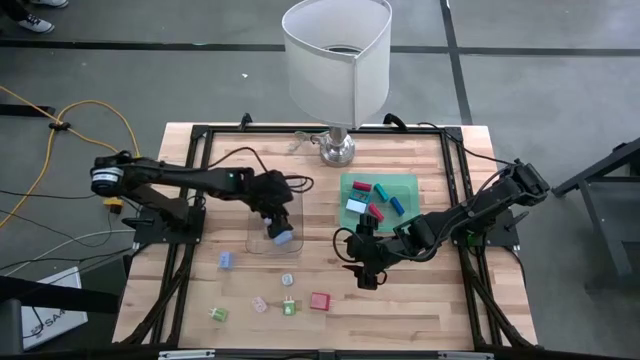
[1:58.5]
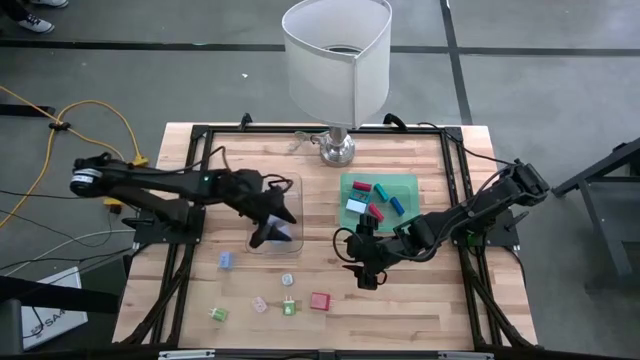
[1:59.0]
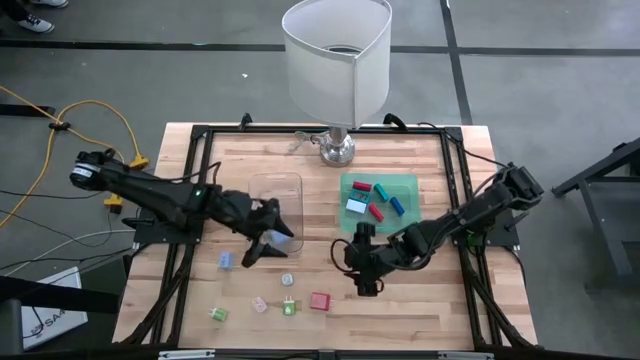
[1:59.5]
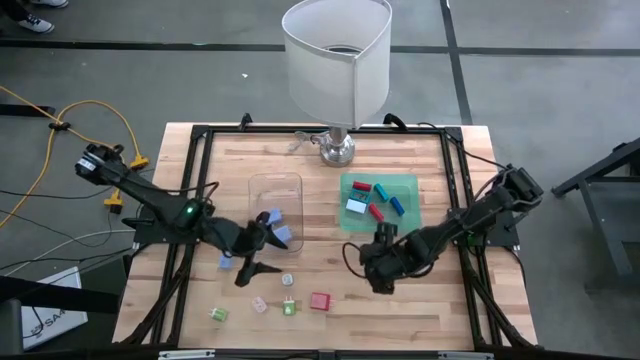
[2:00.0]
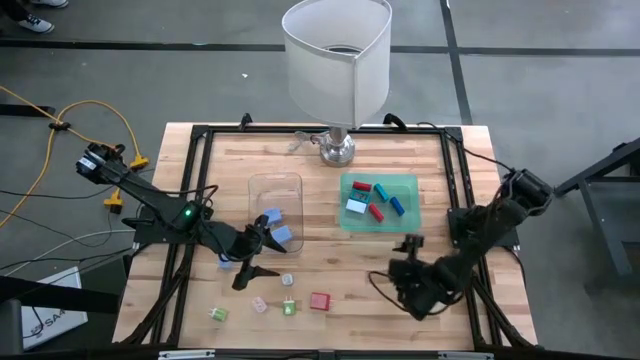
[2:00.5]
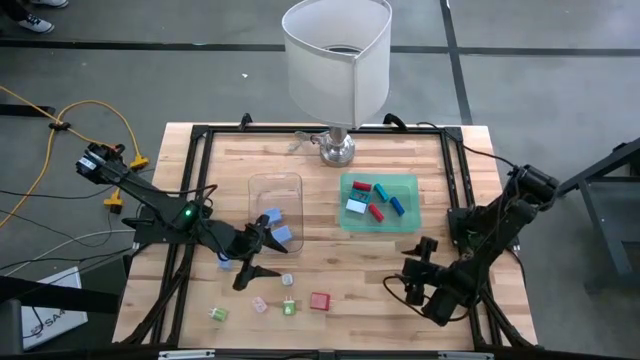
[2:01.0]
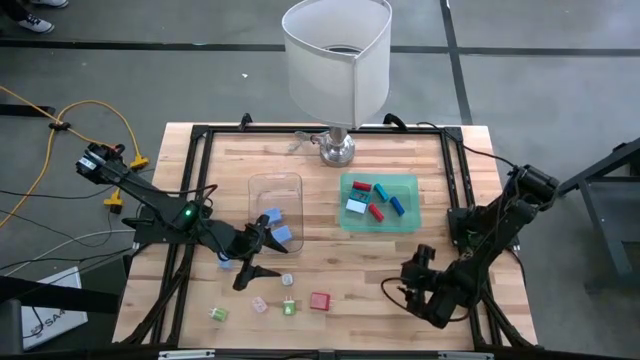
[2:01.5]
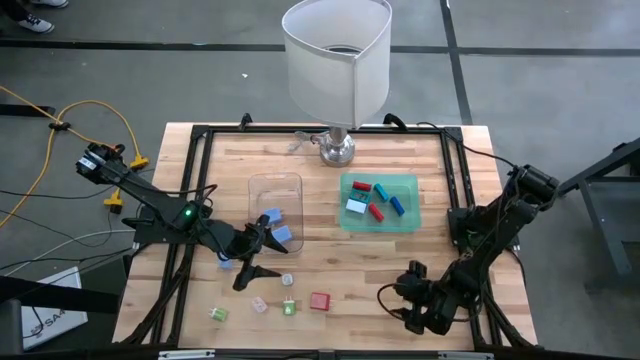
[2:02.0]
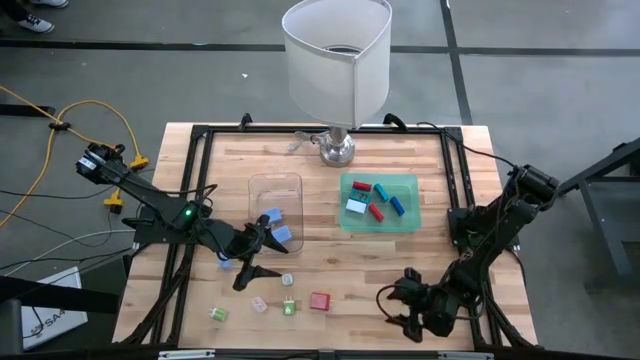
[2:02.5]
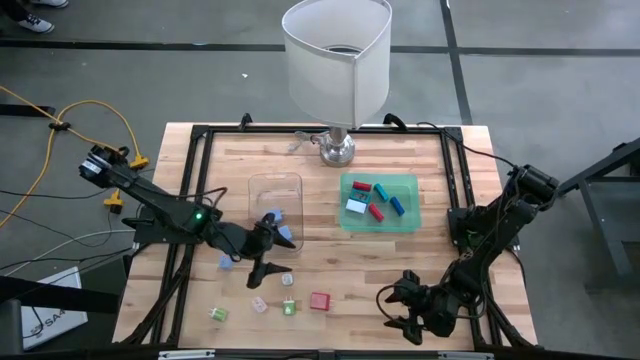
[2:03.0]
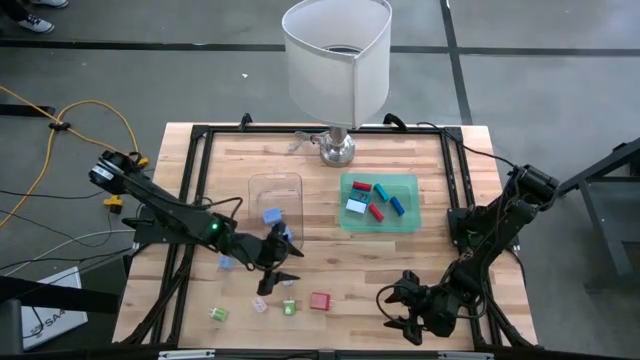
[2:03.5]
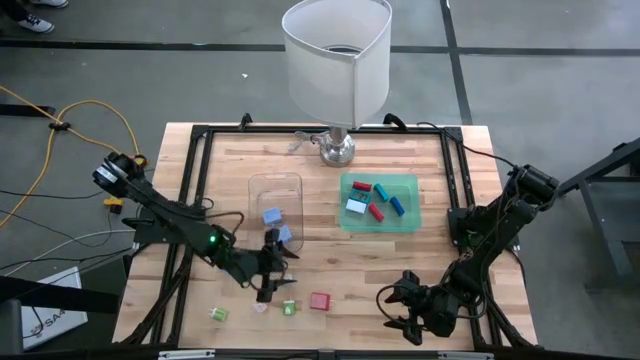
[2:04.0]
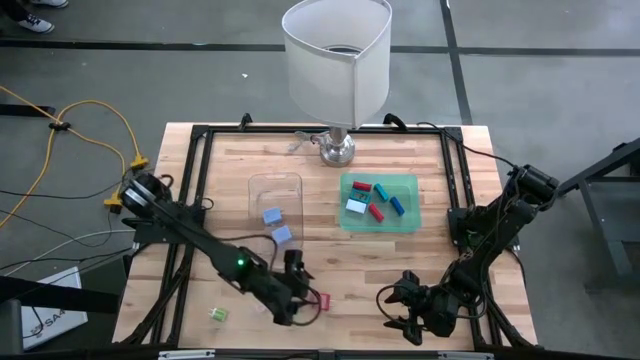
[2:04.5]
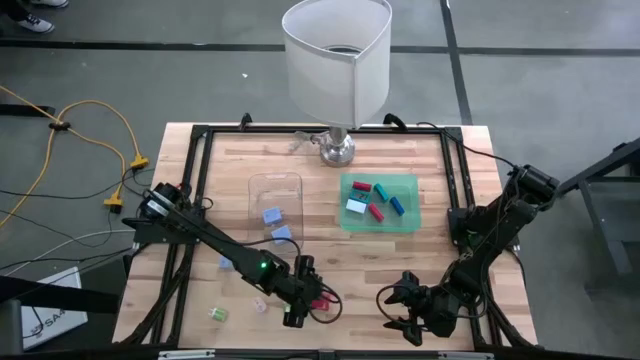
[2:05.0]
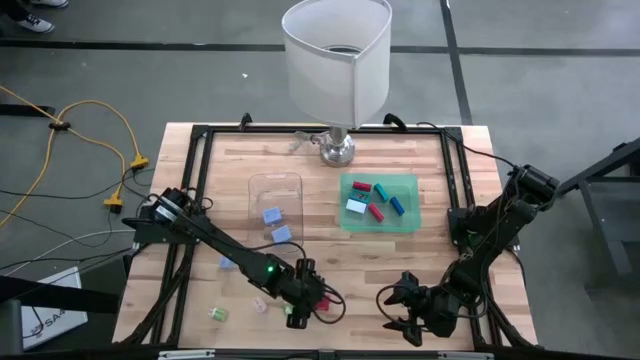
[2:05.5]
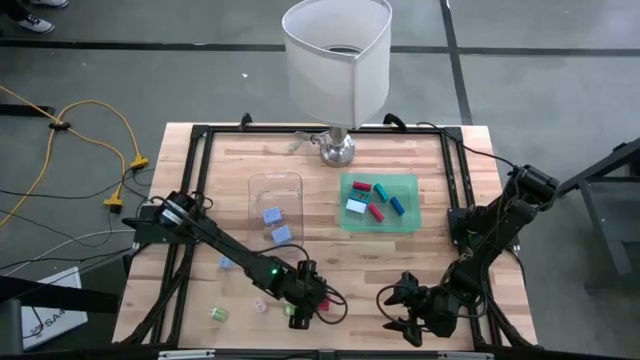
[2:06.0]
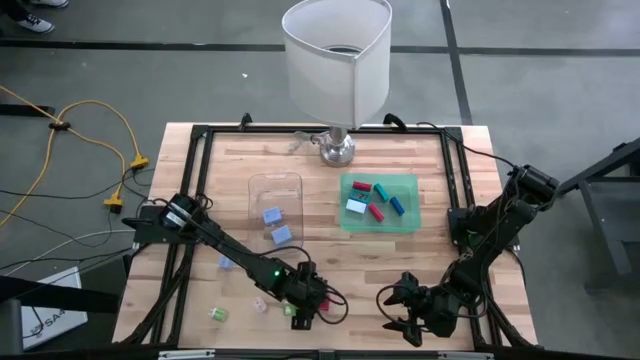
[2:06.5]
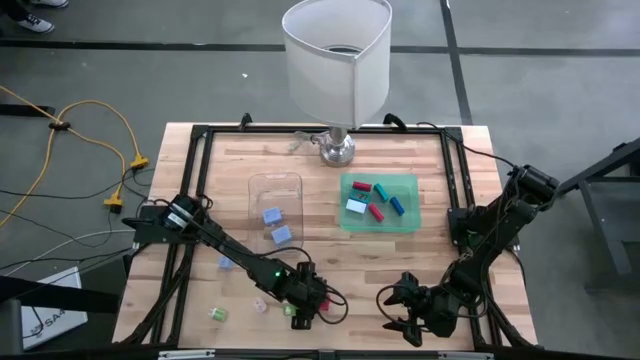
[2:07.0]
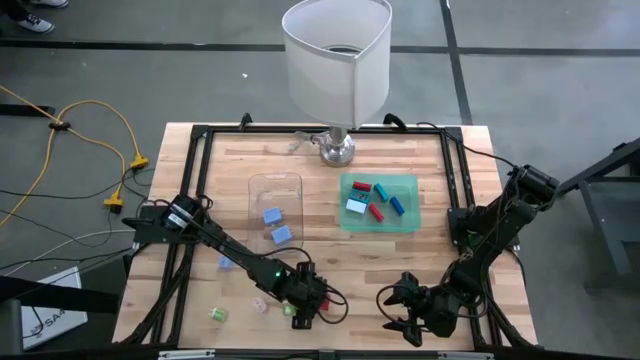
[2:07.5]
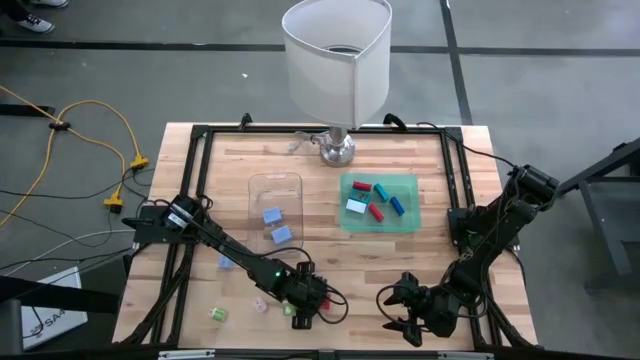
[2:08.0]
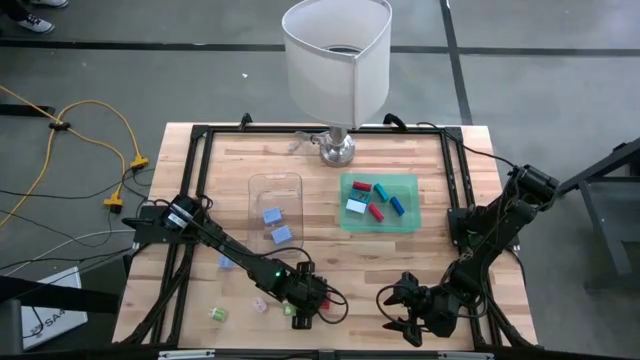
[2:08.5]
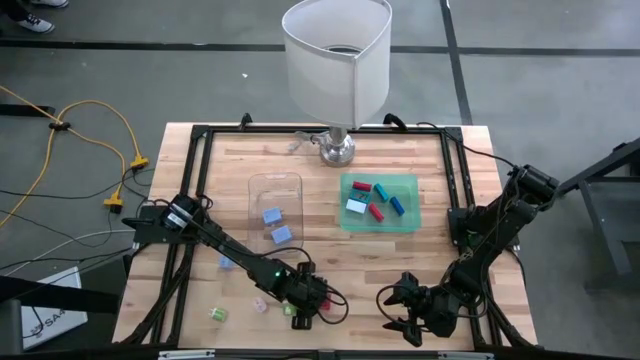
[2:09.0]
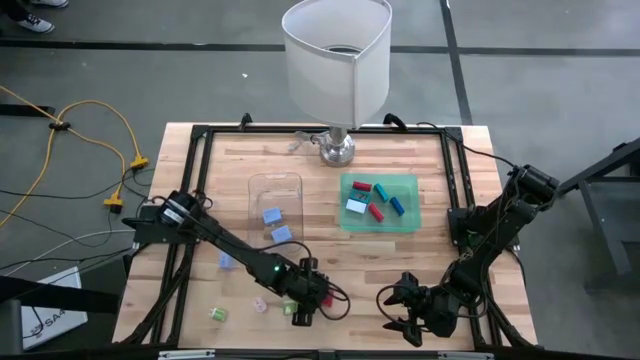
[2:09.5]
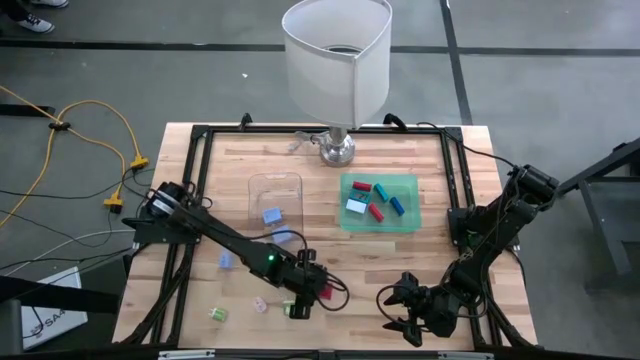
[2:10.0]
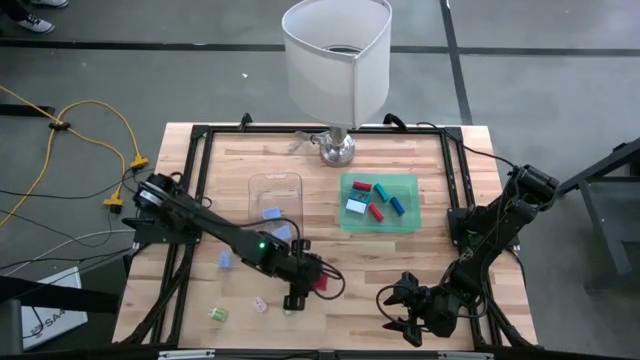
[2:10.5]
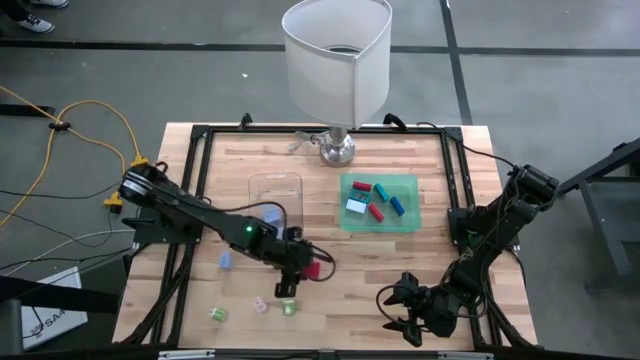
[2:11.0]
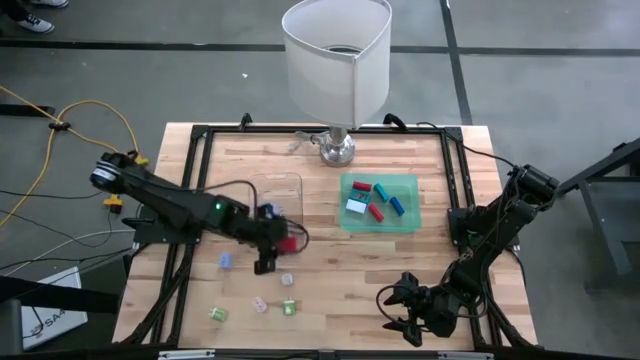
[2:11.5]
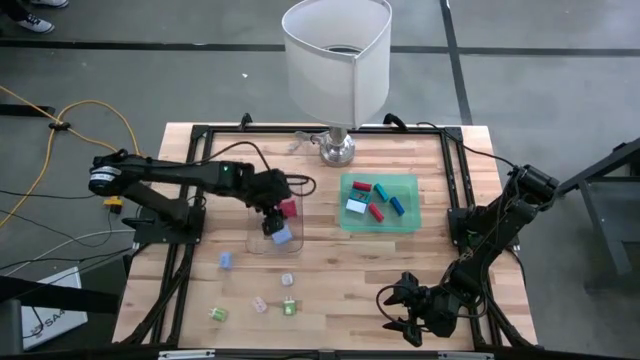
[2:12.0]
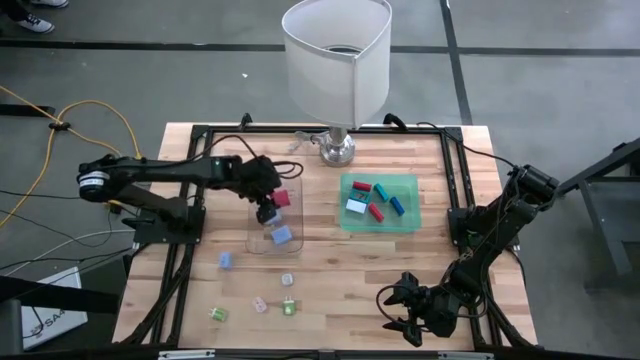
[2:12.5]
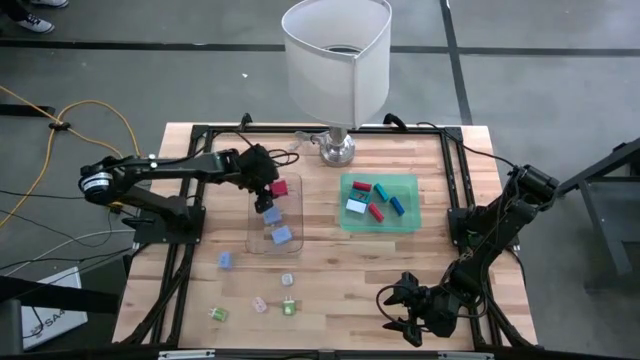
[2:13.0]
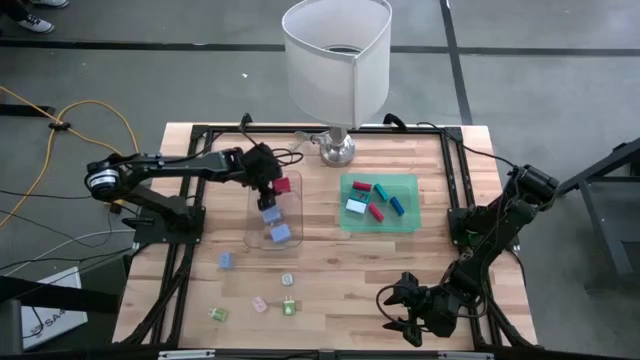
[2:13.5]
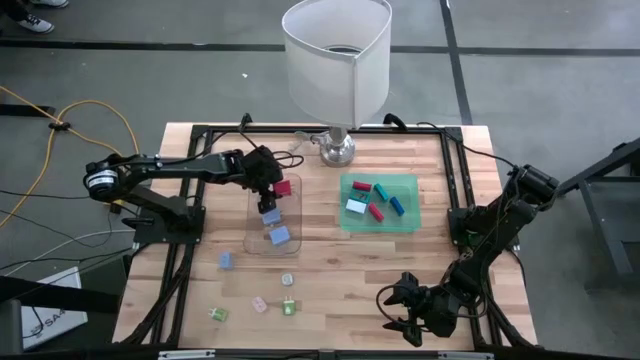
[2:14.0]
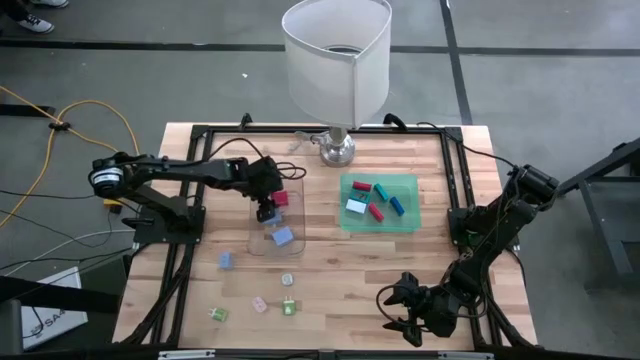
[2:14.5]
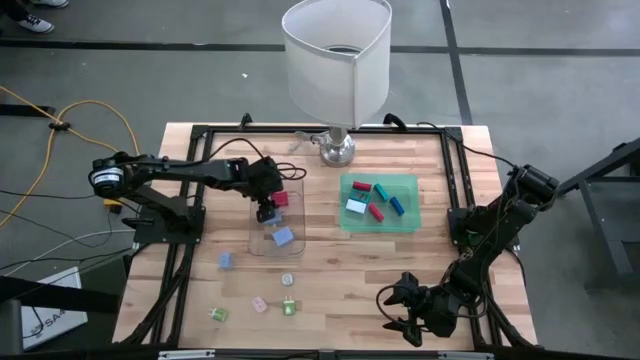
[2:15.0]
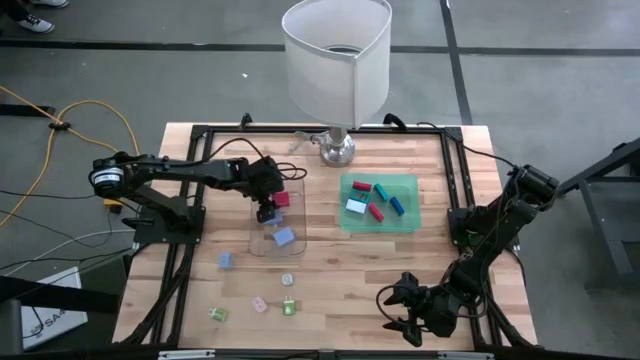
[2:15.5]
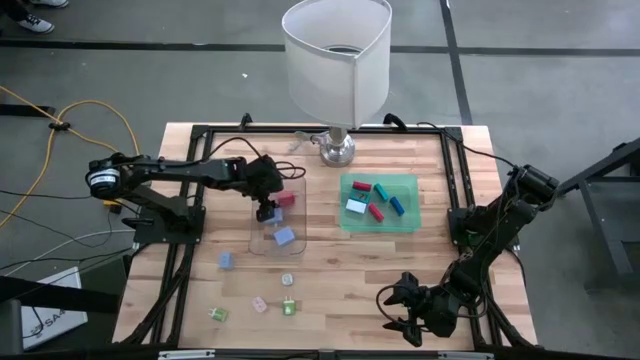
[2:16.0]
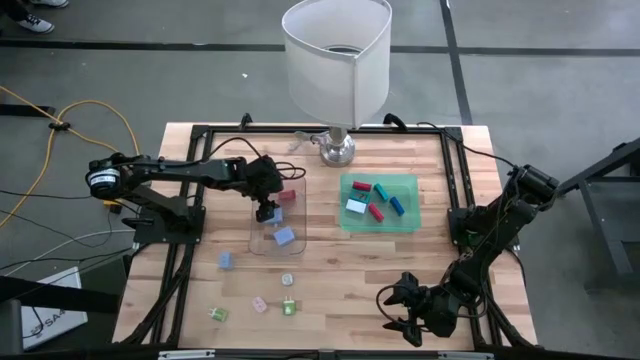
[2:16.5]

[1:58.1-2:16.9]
Task: Pick & Place Office items
Put the red charger adapter into the transparent bin

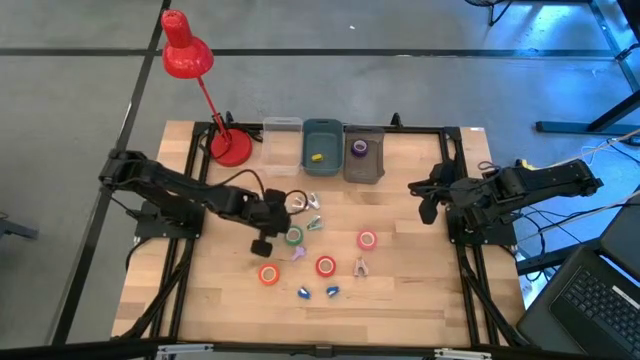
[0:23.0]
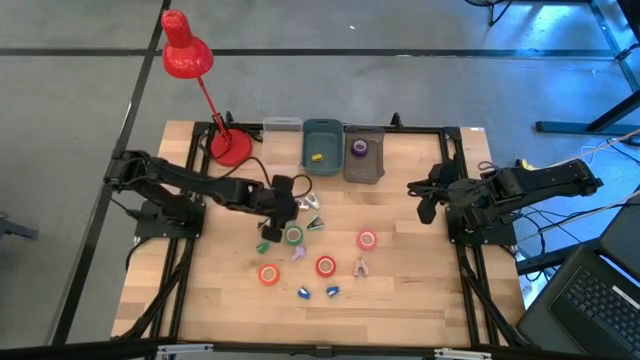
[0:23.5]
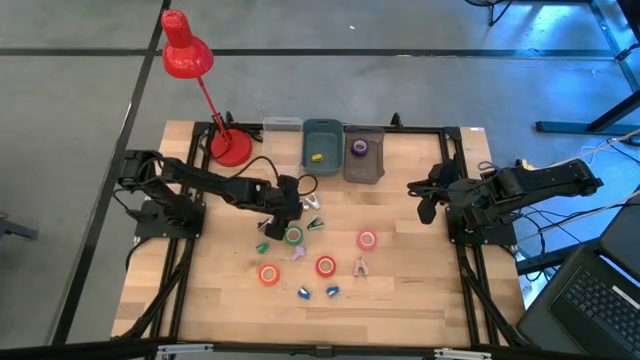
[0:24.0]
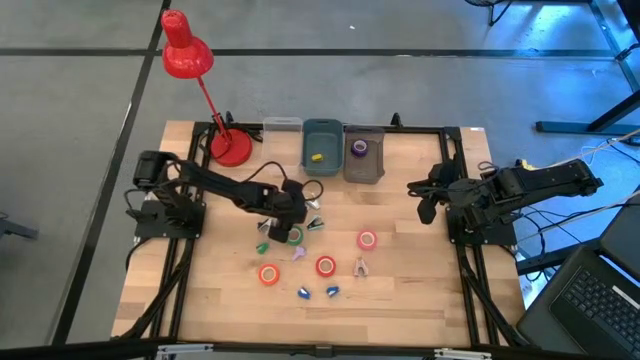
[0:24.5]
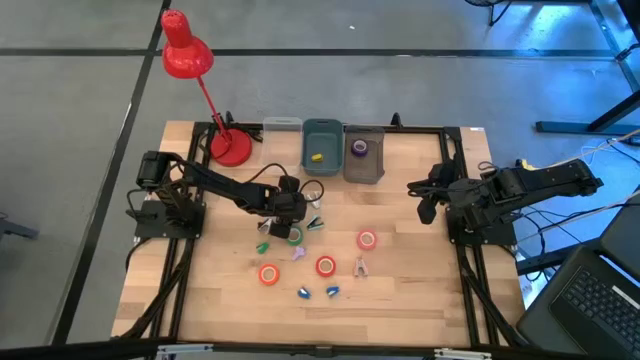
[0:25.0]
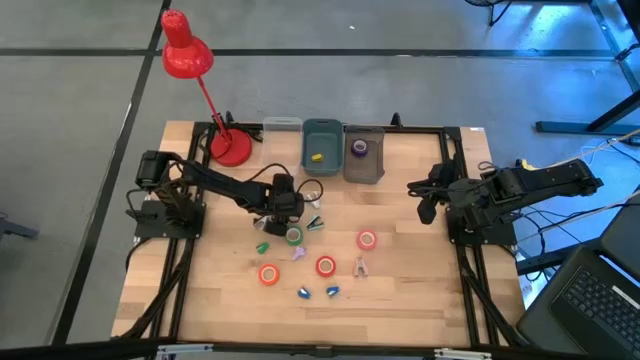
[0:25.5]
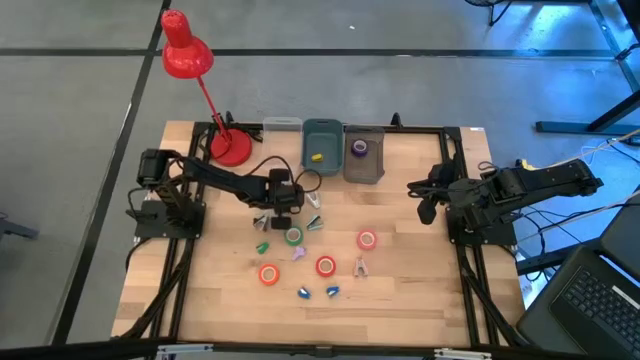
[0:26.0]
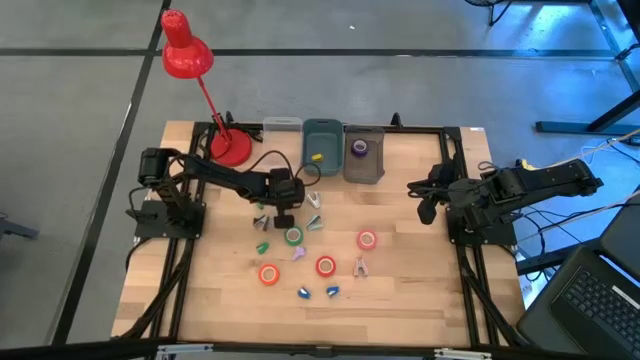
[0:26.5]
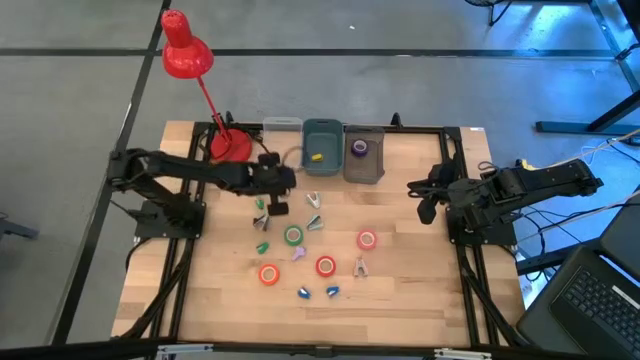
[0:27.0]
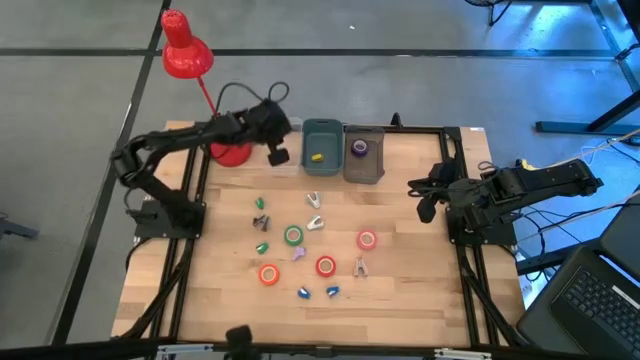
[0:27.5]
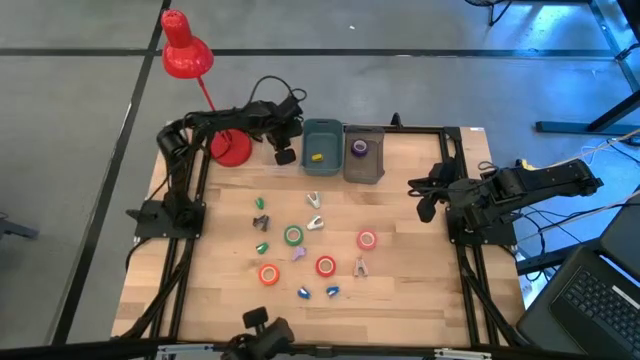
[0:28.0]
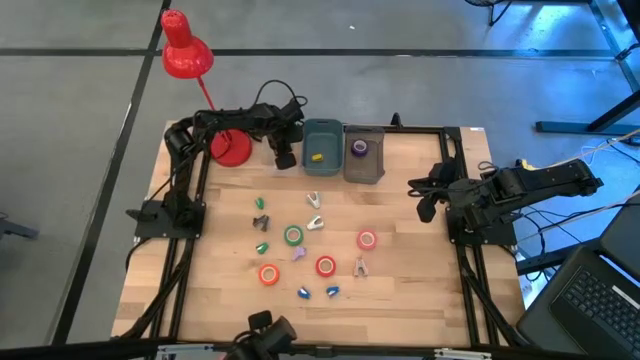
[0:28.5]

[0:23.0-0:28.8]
Task: Pick and place Stapler, Stapler remover, tape
Put the gray staple remover into the transparent bin
